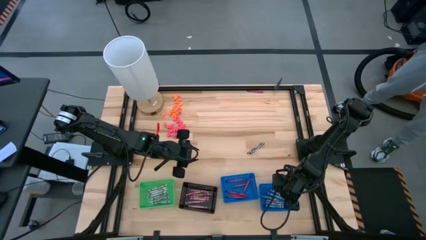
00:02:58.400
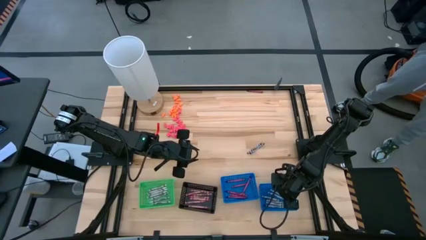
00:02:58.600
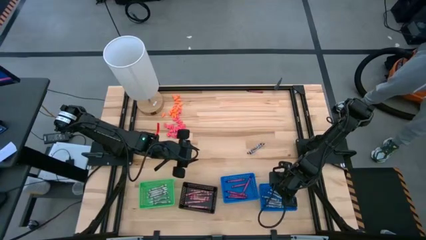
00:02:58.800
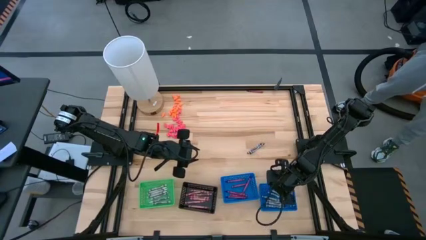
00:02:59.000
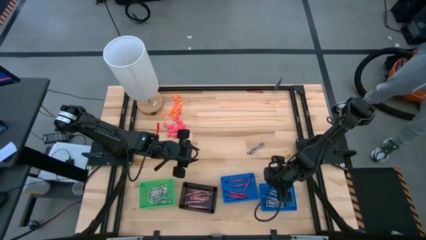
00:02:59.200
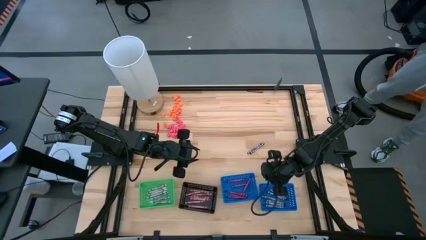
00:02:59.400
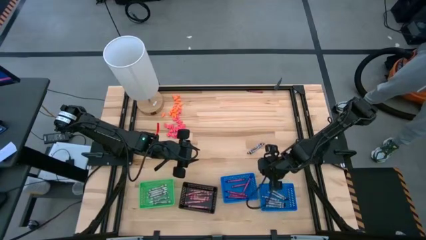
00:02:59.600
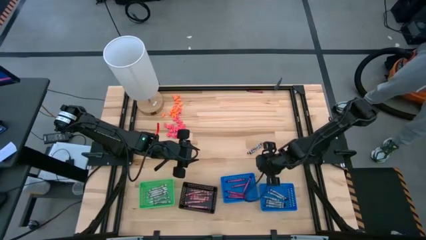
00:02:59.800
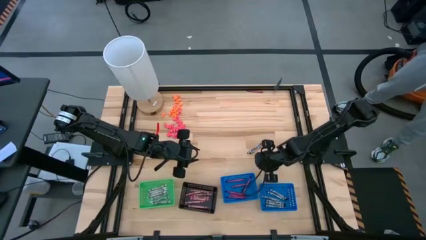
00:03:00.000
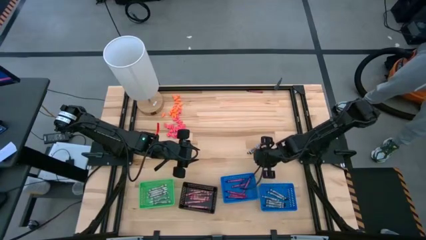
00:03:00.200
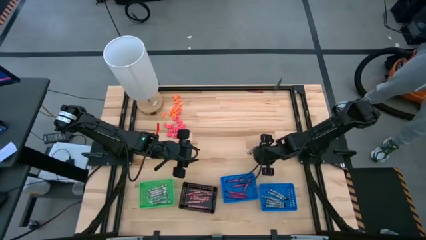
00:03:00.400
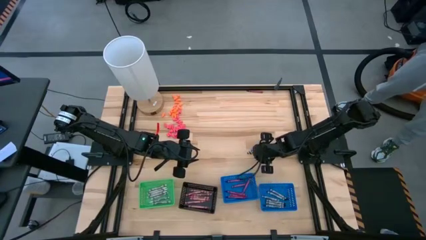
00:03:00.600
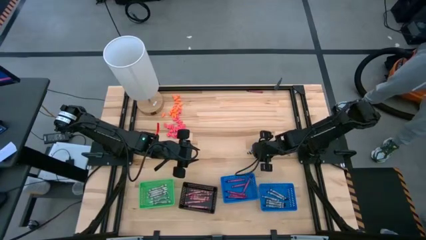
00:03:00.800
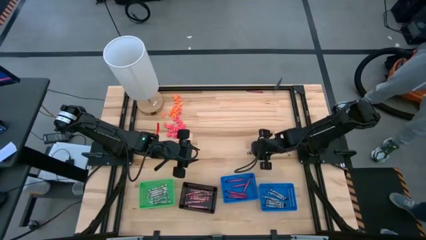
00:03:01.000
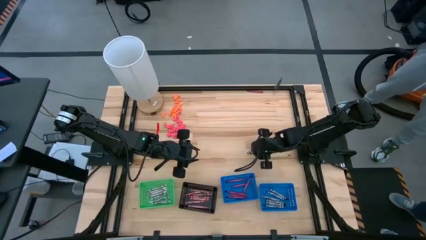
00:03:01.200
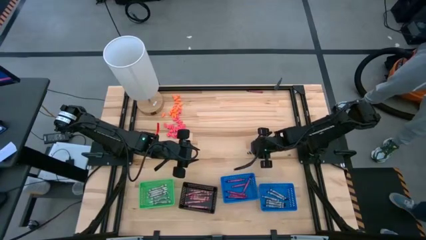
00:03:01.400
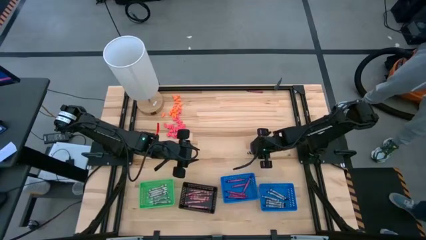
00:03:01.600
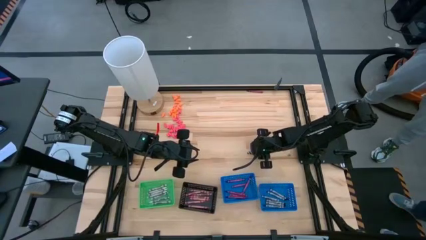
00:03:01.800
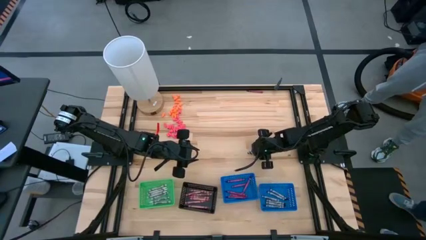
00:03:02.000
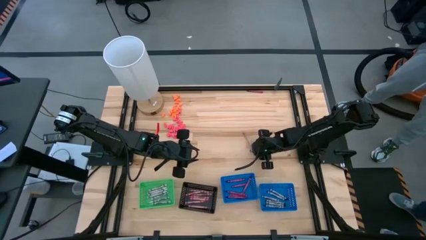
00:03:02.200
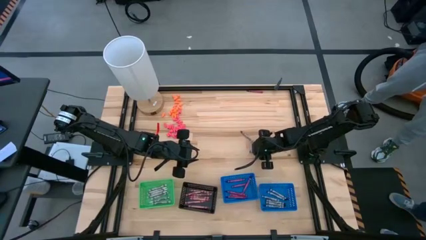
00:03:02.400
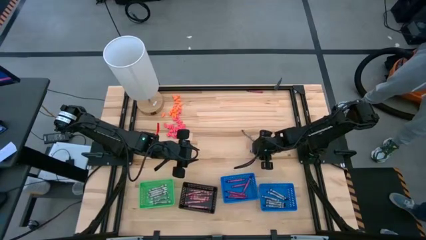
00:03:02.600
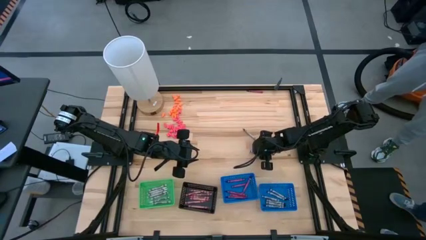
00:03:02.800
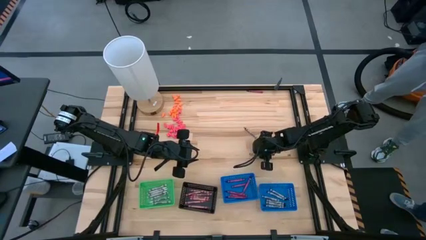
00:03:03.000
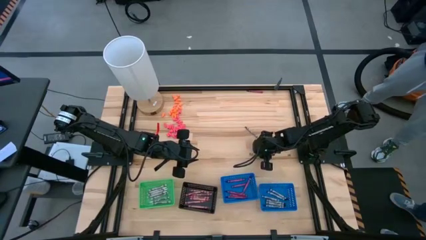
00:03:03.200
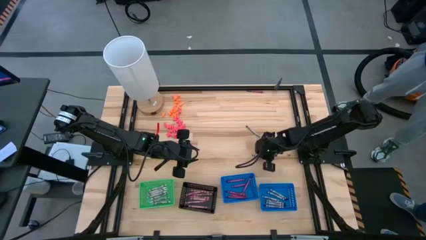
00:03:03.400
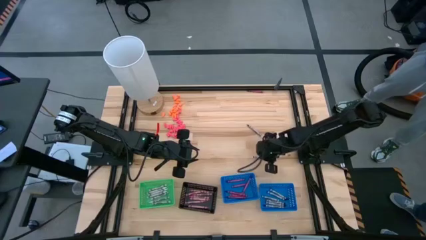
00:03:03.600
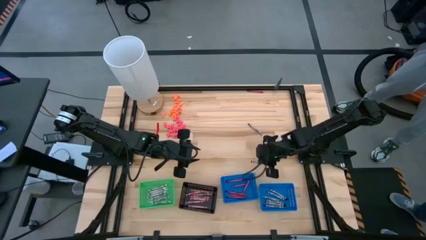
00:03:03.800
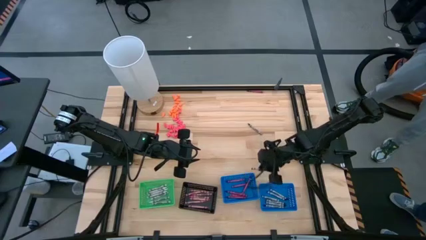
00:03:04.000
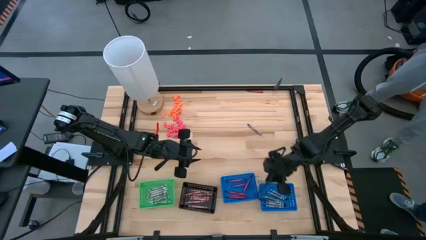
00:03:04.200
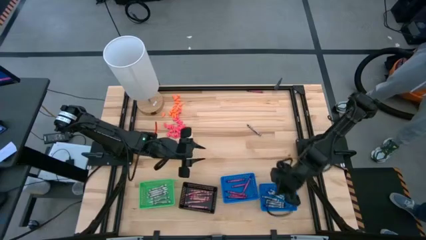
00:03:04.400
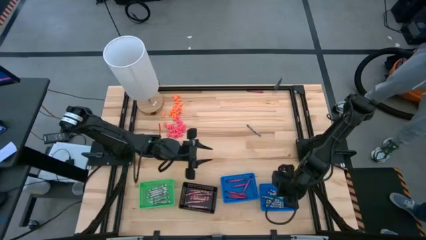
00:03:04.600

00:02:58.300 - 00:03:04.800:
Task: Sort crayons
Put the black crayon into the right blue bin

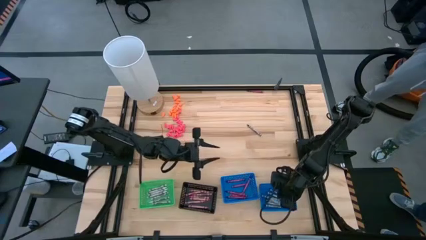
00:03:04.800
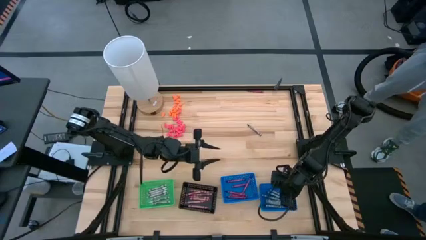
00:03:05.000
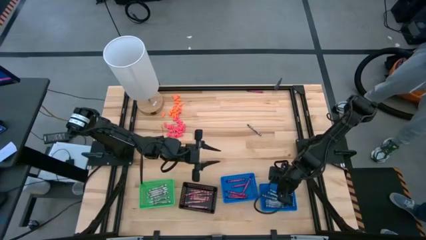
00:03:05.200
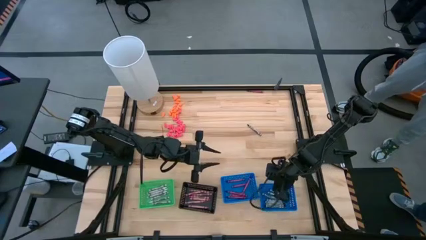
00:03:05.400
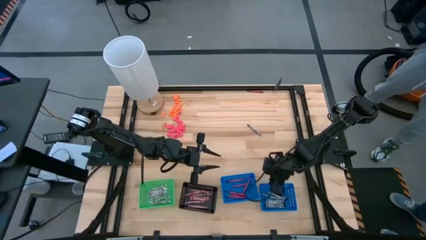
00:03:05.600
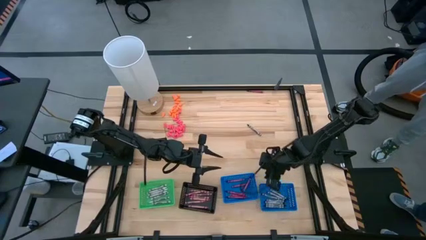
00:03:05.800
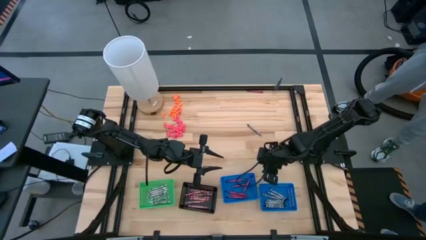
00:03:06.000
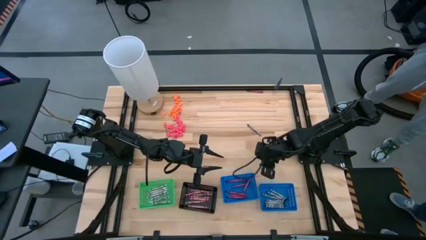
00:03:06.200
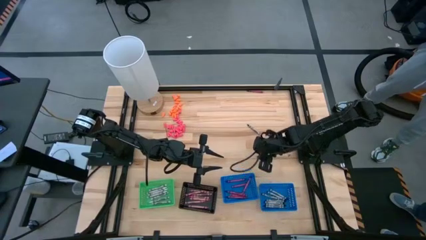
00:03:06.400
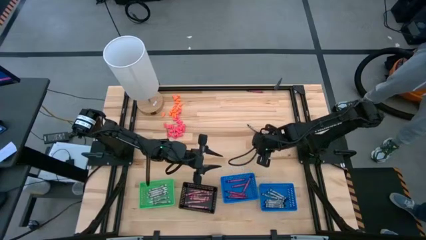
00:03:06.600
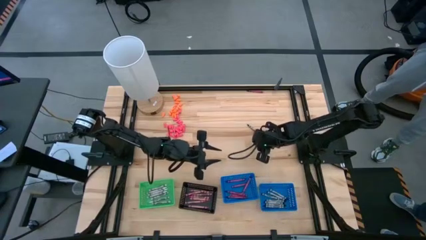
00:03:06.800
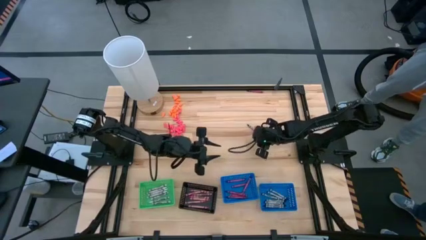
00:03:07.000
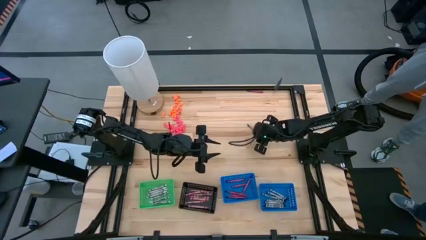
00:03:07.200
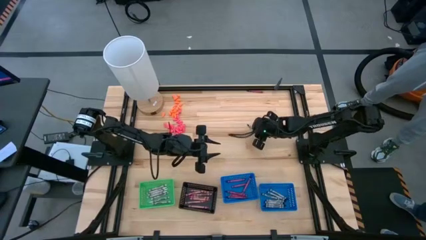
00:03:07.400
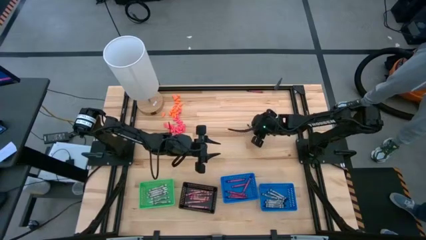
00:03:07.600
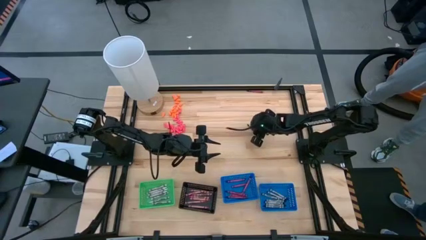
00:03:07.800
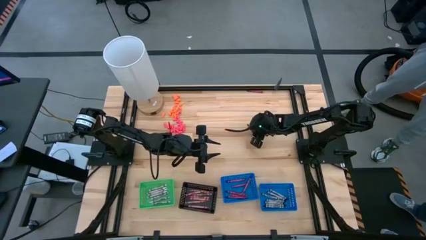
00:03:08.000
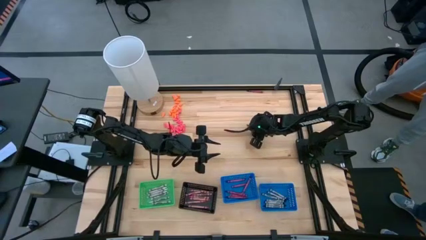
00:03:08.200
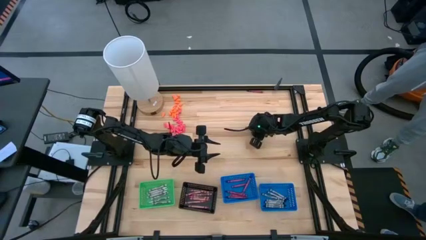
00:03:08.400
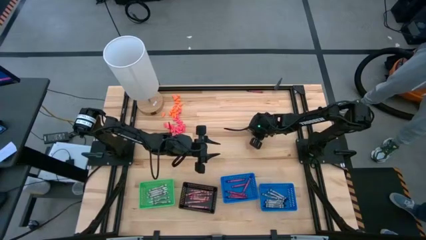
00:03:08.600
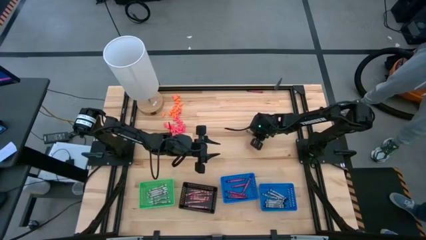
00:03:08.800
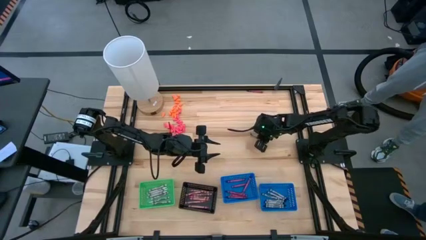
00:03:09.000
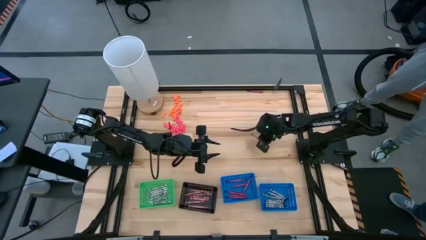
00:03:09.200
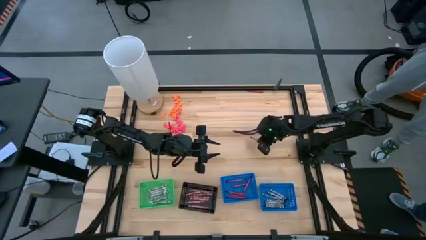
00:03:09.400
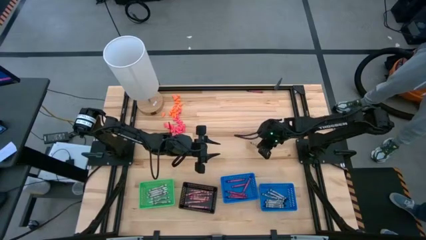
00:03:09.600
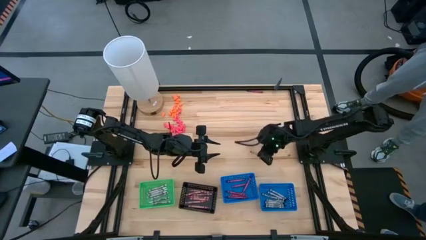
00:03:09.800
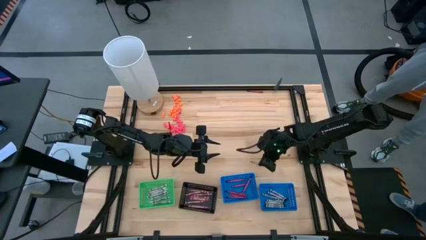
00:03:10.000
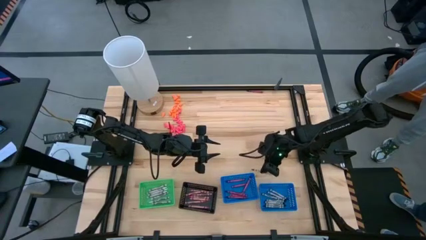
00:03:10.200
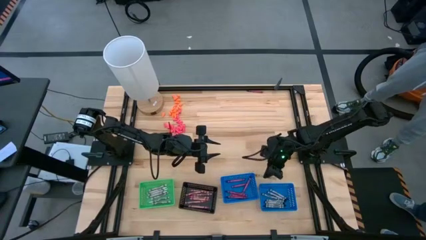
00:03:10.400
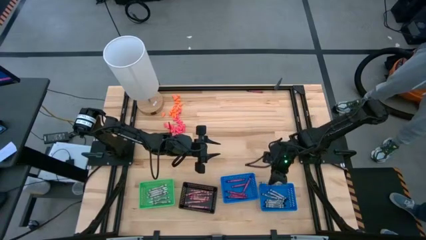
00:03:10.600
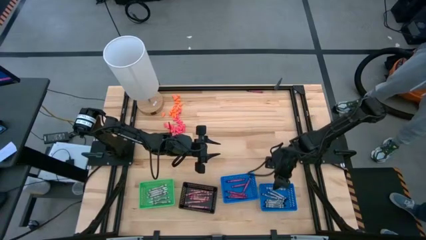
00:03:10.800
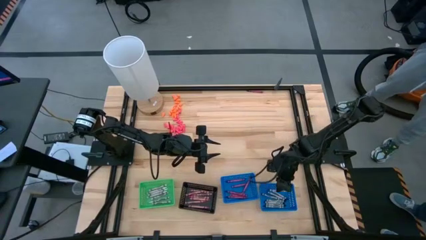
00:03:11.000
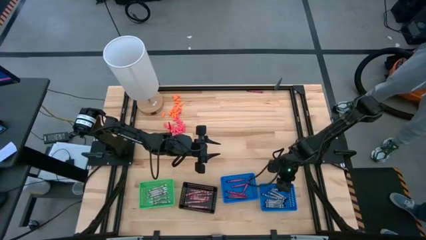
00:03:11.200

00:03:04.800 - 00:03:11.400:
Put the black crayon into the right blue bin

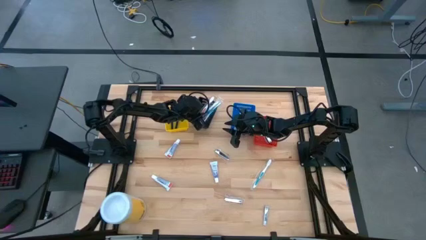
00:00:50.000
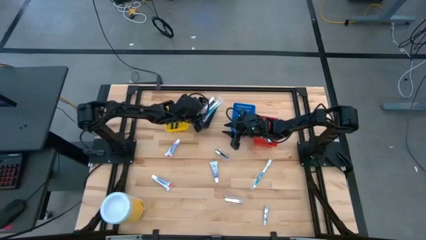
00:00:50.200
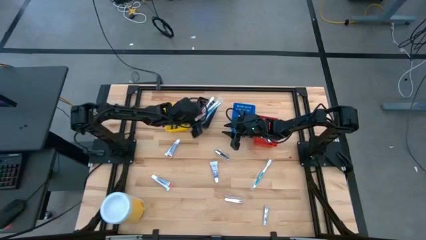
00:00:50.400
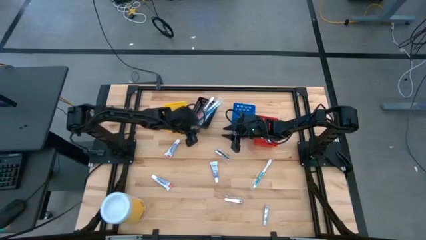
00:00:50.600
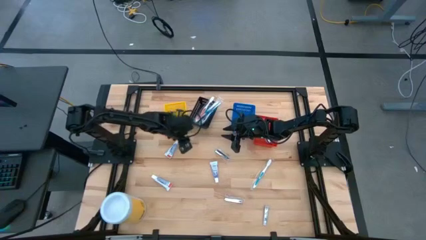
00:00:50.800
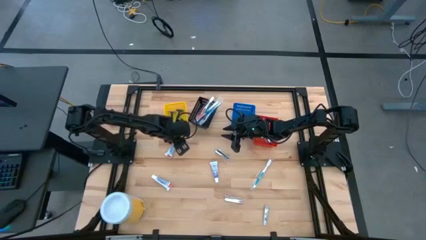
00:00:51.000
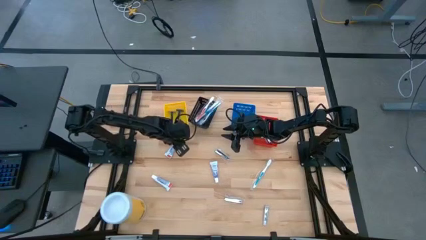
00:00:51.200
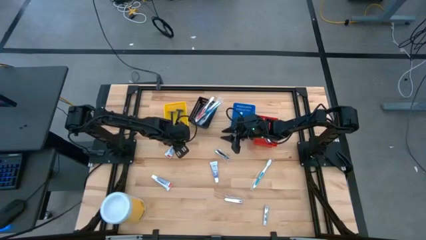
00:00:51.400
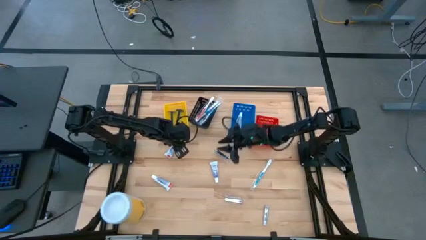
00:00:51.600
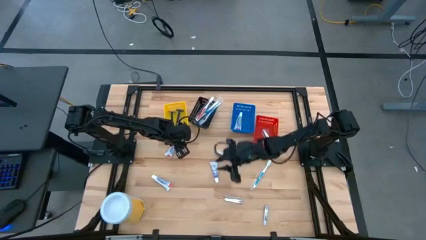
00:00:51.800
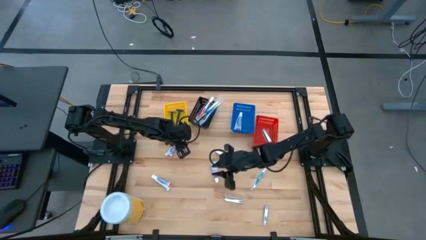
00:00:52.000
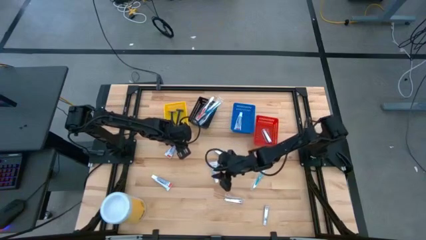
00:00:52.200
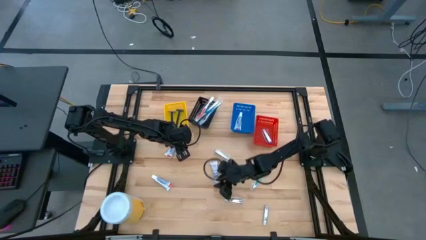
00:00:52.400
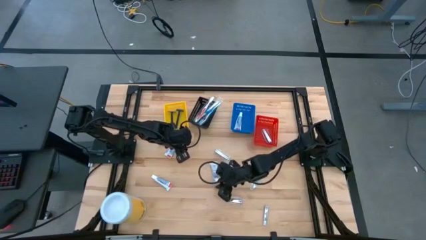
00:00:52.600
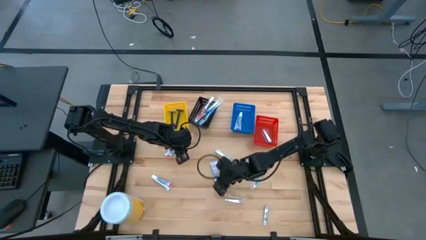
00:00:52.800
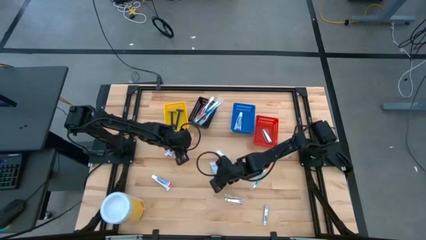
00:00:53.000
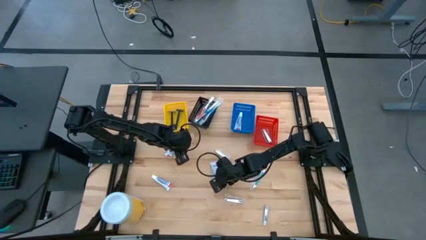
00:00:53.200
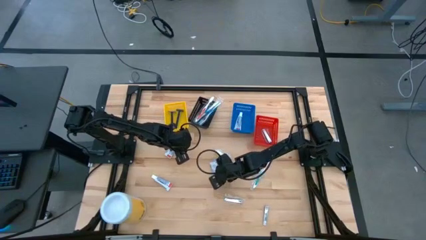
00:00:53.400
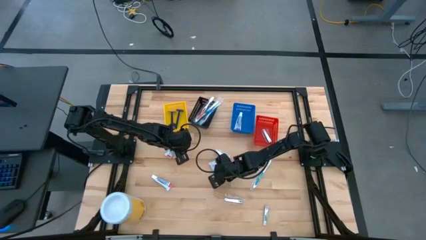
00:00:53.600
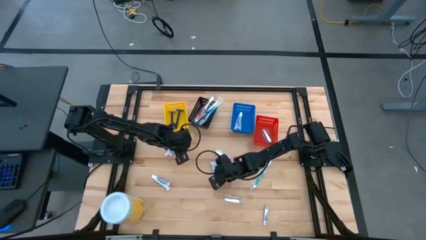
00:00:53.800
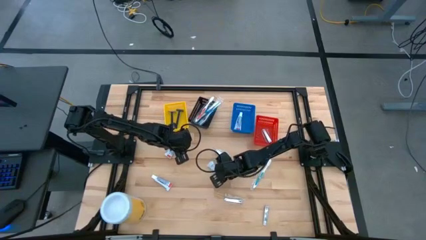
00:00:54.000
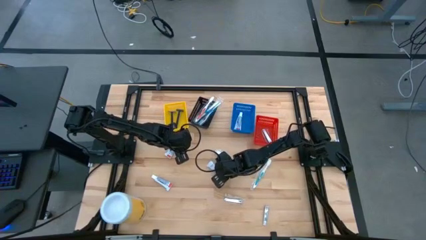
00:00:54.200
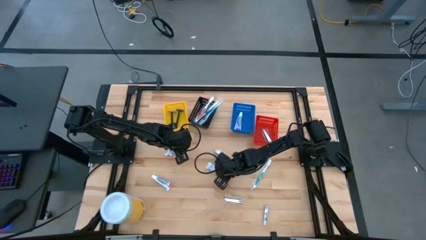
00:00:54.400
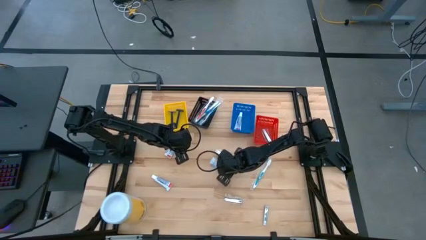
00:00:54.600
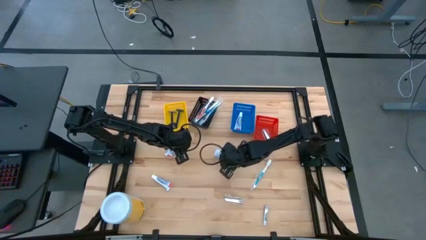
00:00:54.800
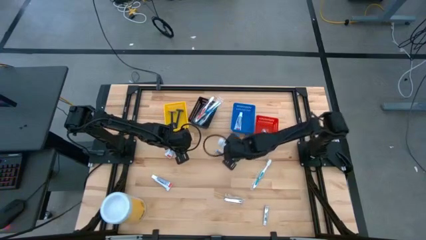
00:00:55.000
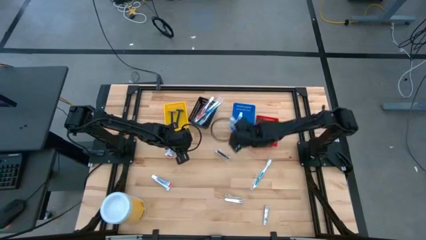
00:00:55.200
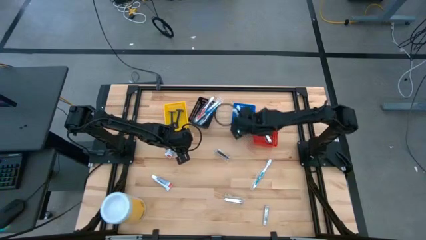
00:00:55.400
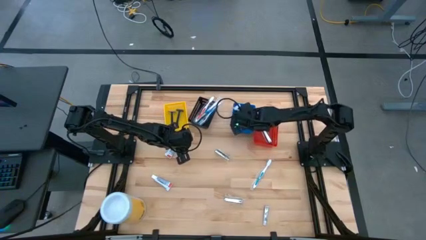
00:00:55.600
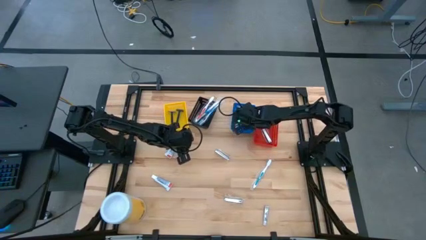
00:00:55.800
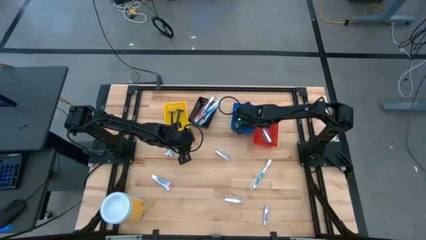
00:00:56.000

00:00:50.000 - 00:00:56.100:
Task: Pick & Place Travel size toiletries
Put the blue toothpaste into the blue bin
